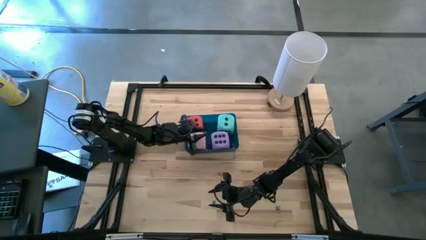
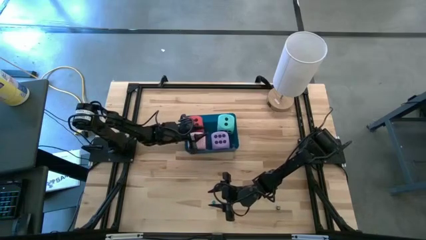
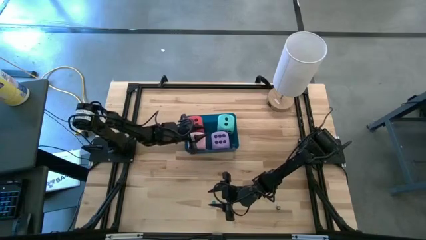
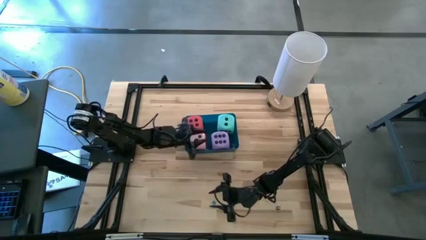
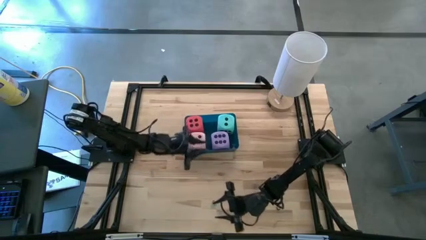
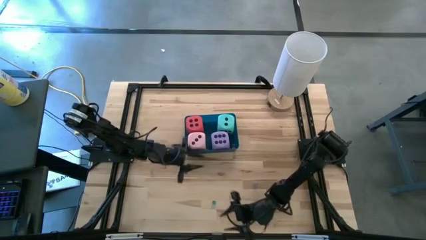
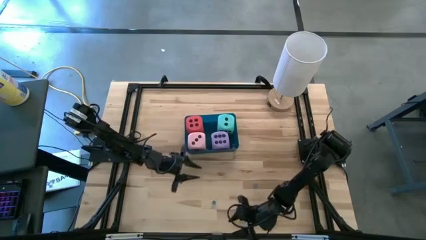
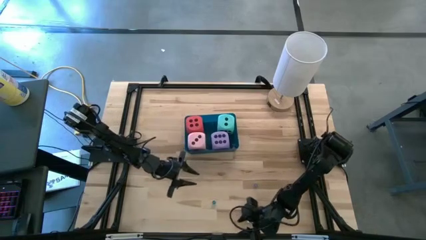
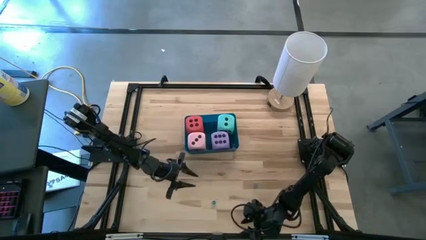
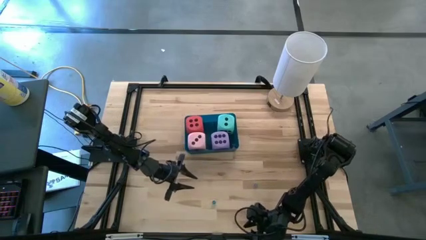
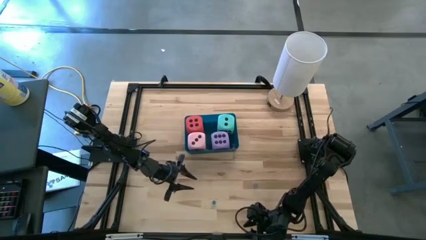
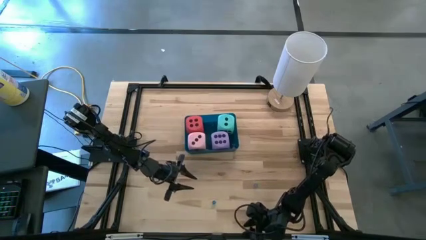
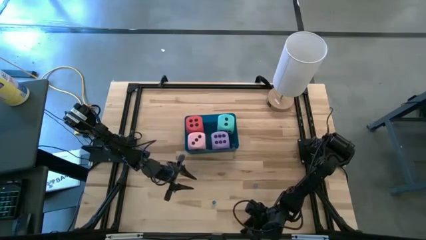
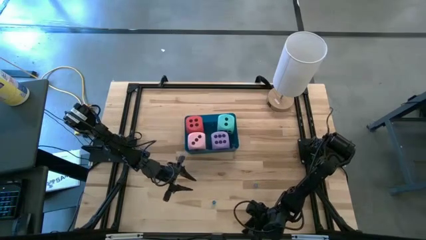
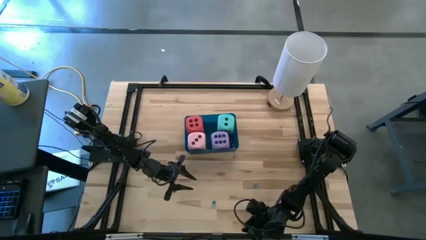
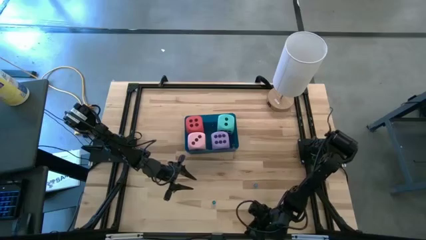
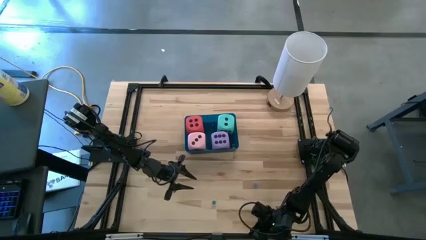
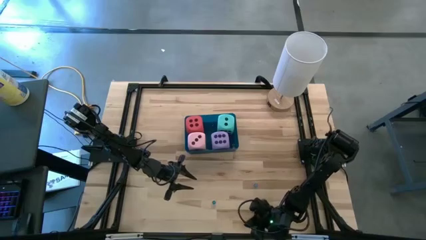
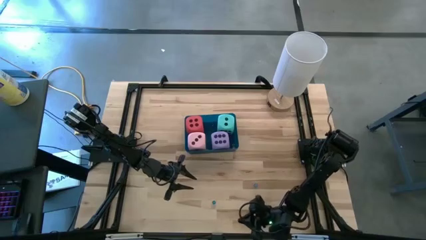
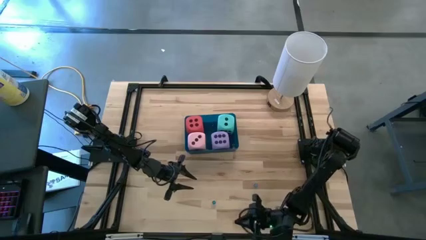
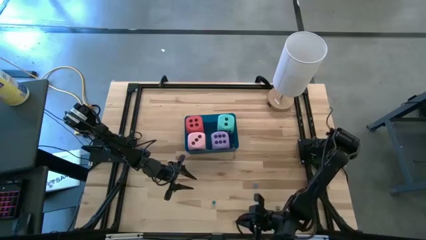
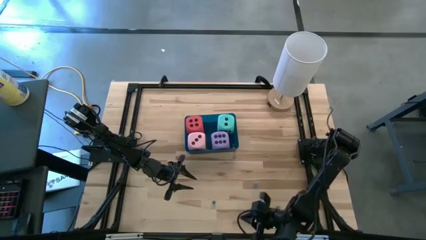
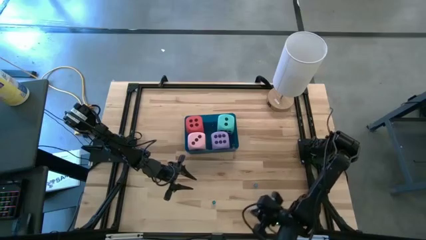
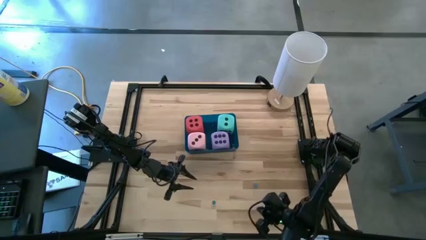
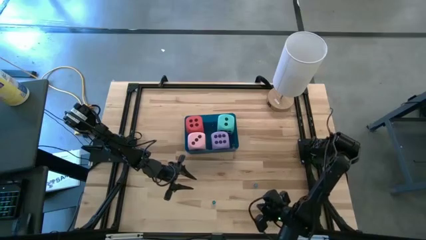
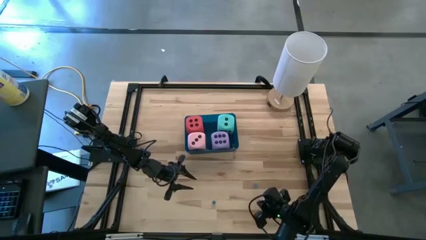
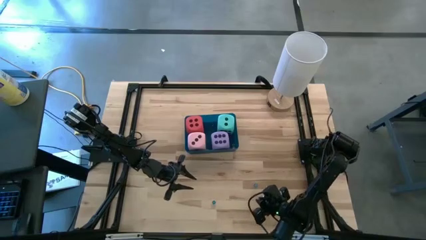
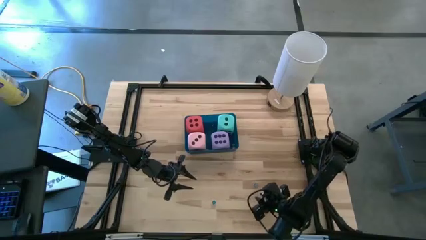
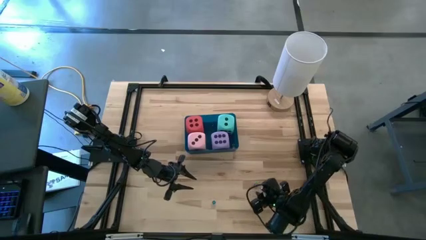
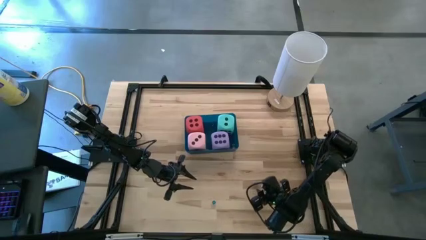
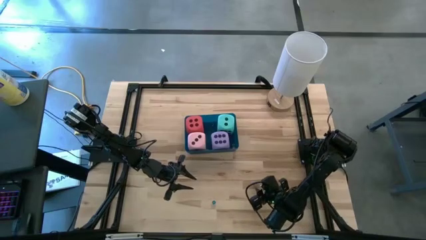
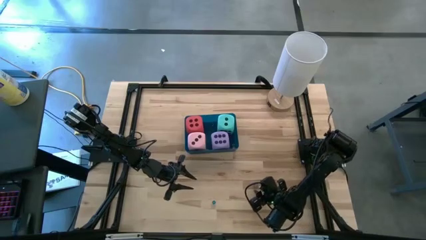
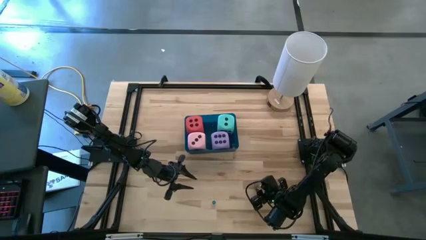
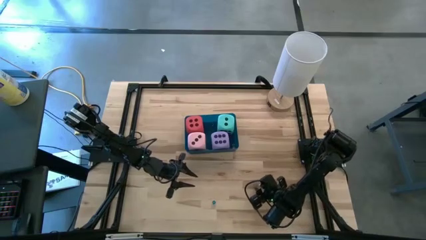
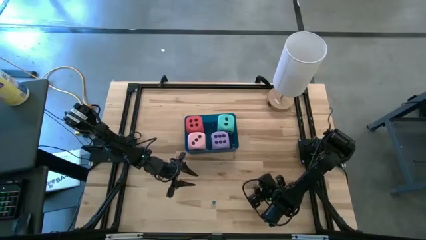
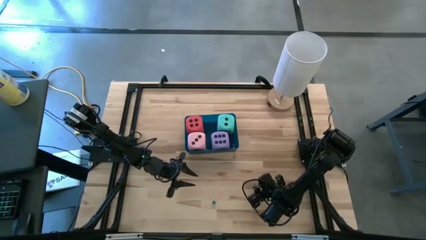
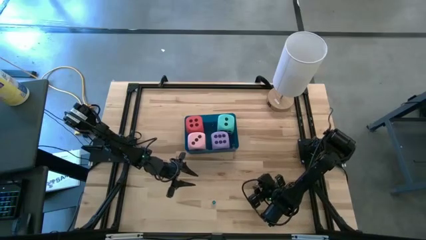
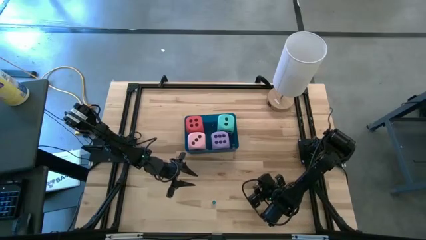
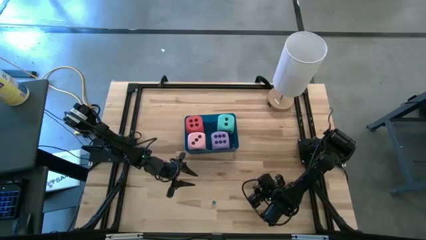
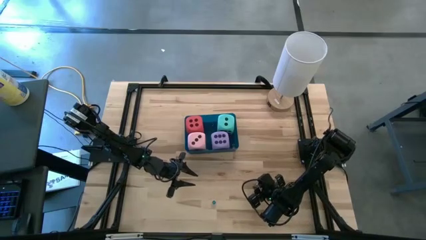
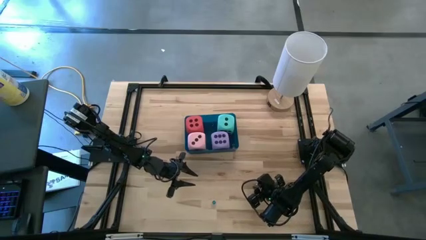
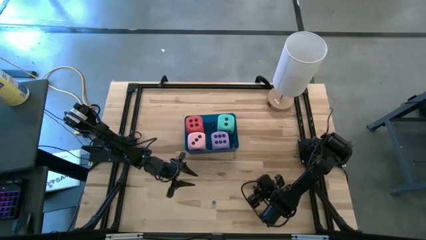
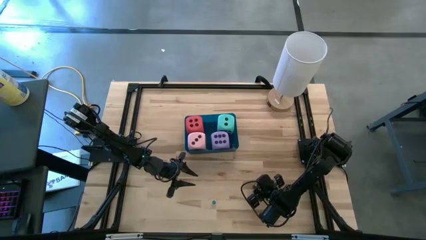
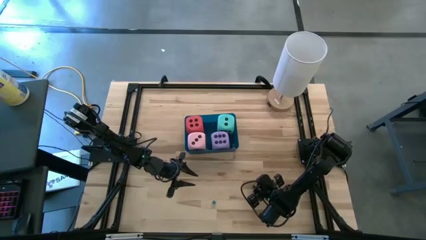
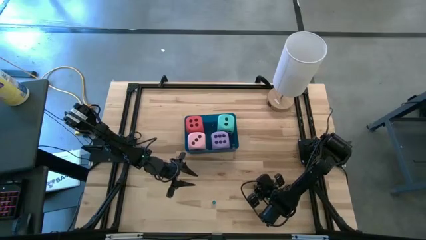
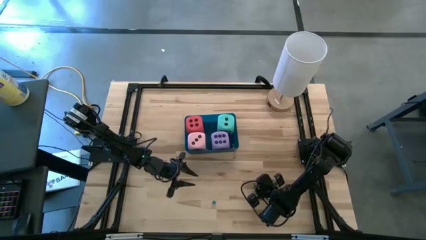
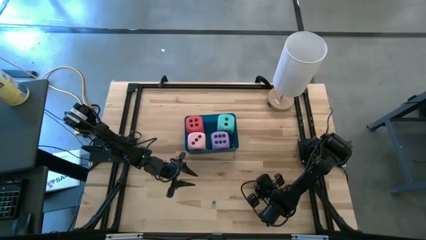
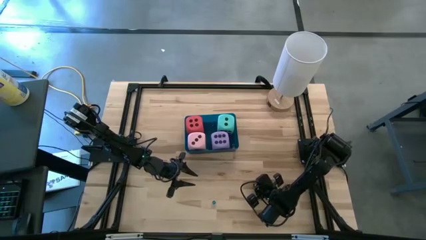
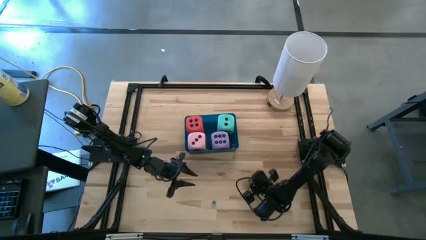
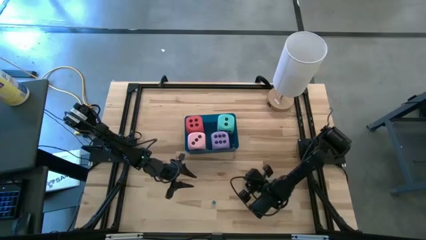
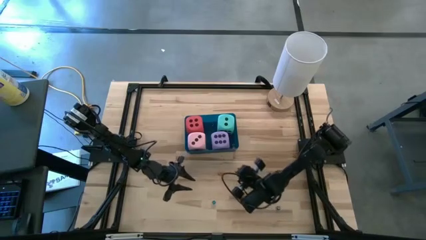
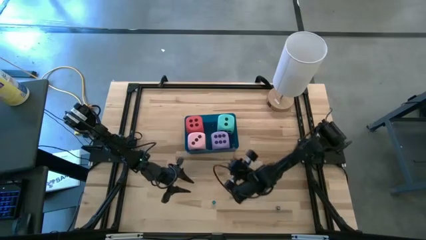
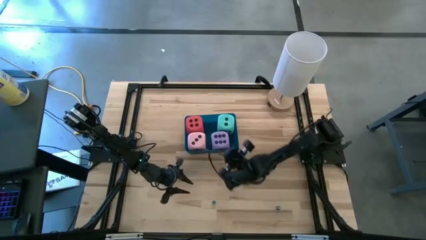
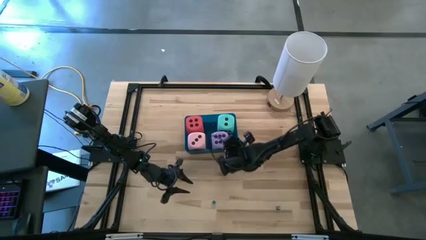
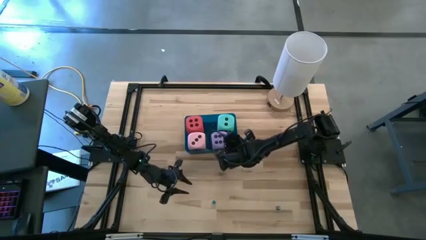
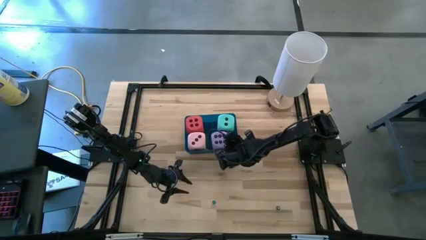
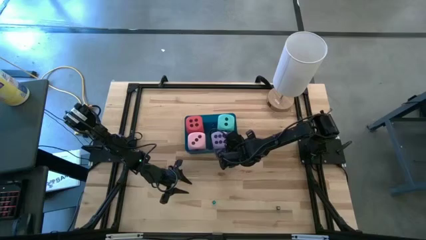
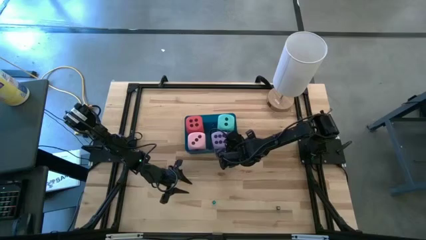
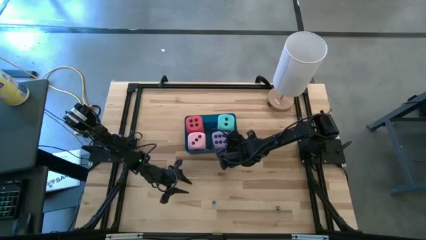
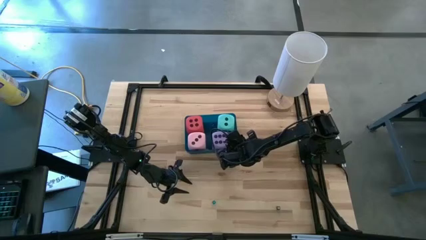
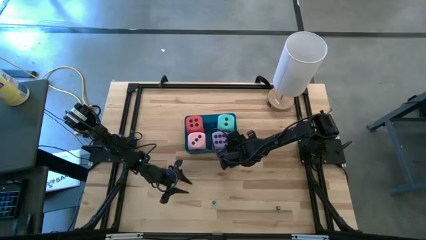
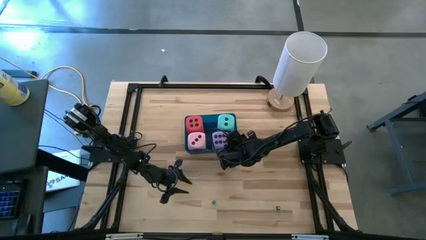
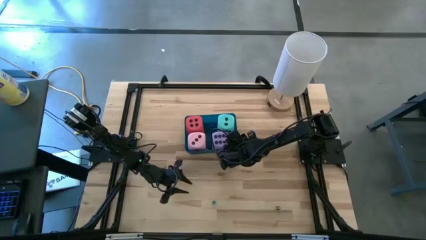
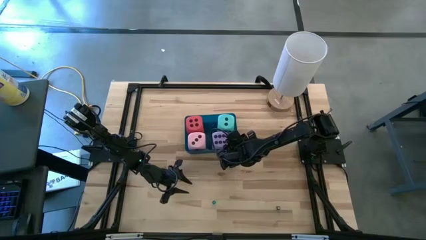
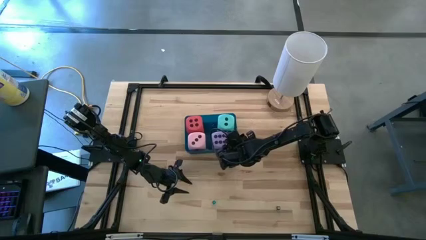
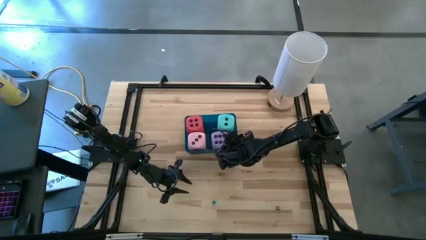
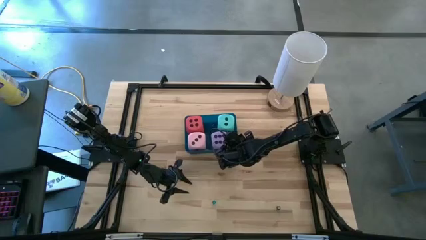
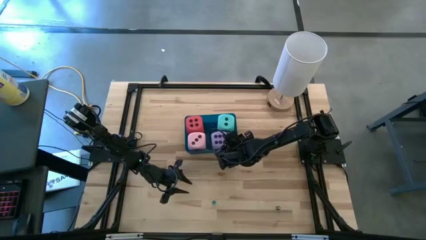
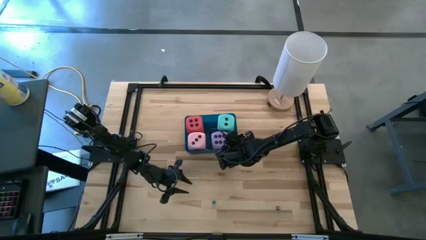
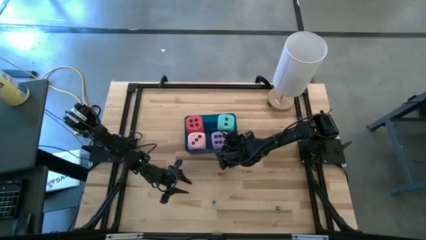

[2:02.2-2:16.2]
Task: Pick & Place Dice
Put the blue die into the blue bin
